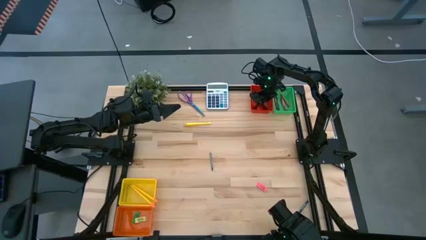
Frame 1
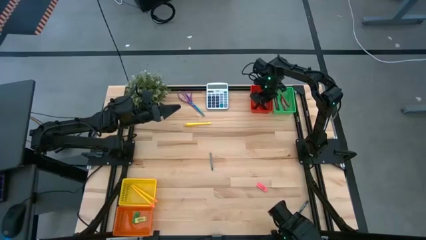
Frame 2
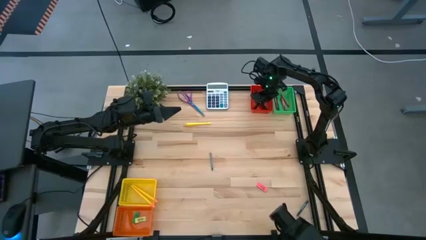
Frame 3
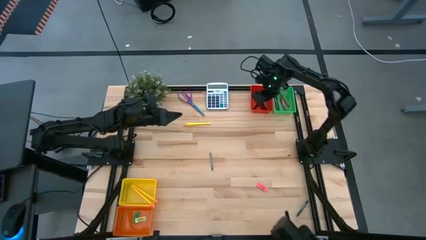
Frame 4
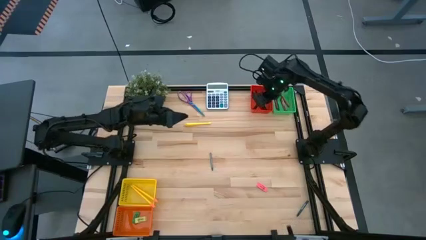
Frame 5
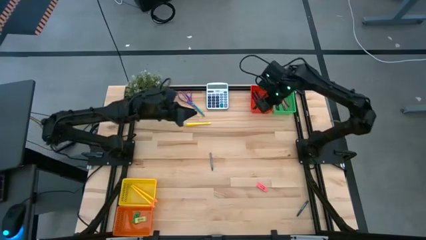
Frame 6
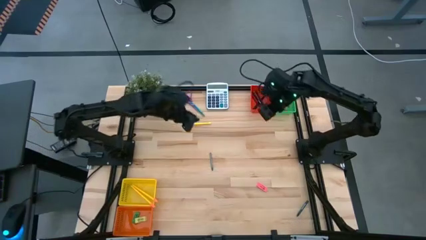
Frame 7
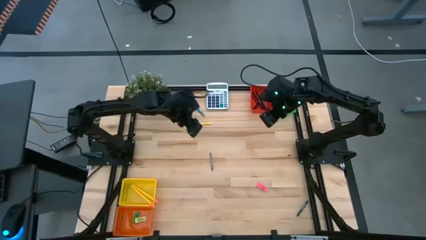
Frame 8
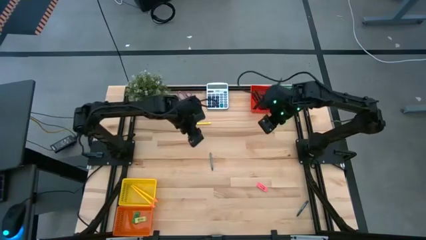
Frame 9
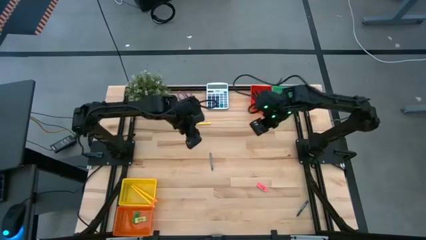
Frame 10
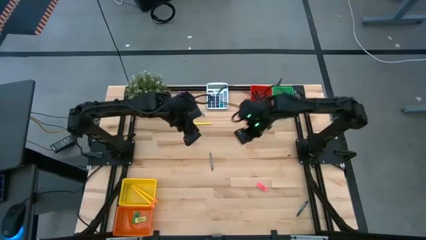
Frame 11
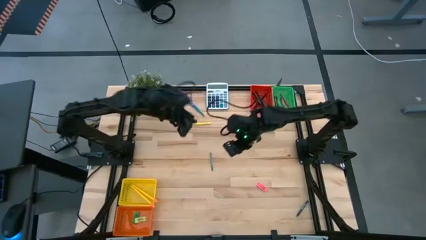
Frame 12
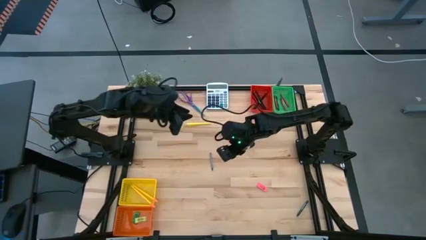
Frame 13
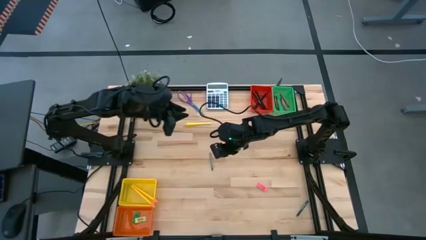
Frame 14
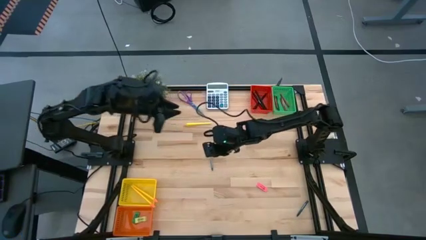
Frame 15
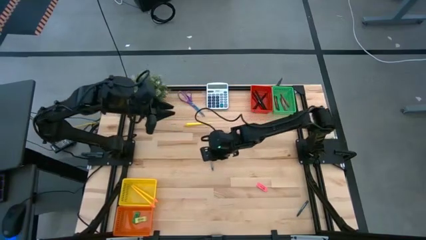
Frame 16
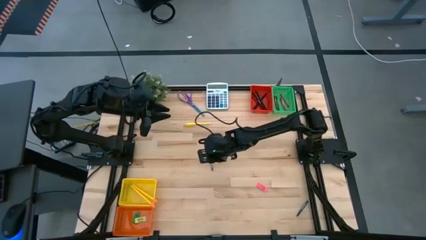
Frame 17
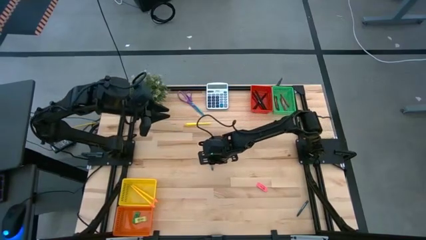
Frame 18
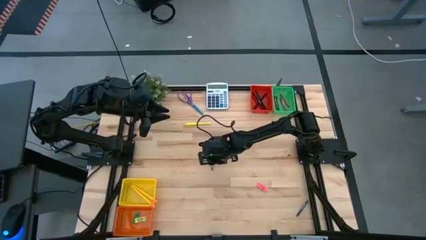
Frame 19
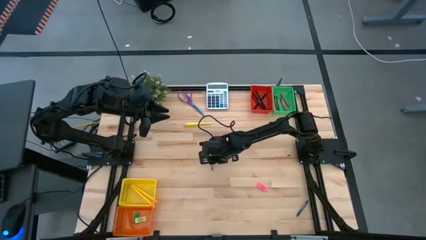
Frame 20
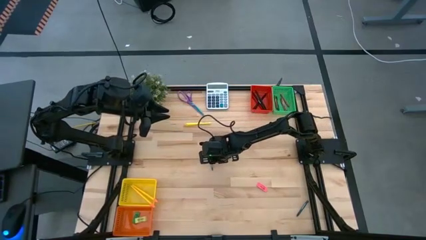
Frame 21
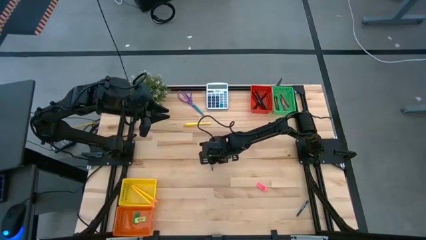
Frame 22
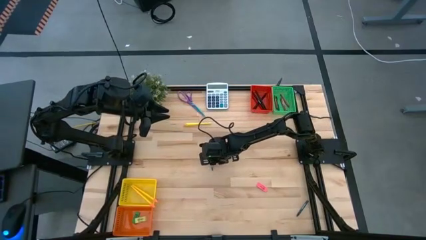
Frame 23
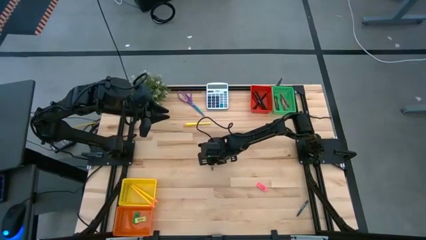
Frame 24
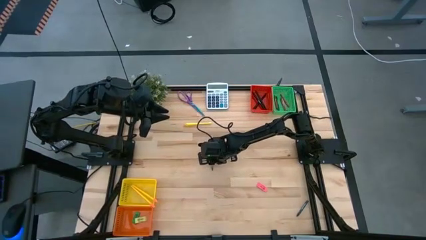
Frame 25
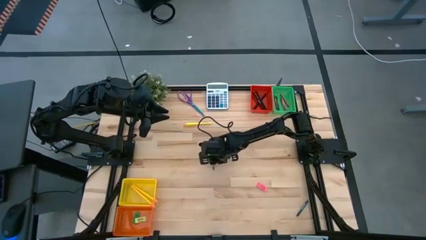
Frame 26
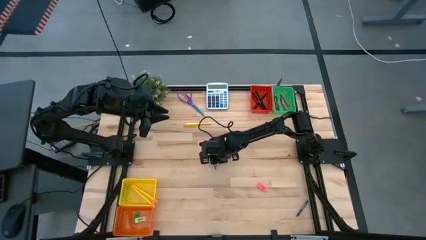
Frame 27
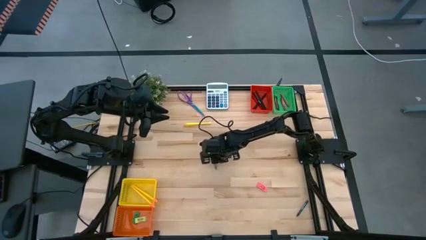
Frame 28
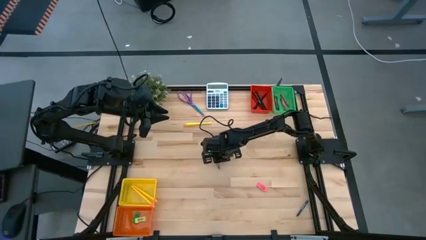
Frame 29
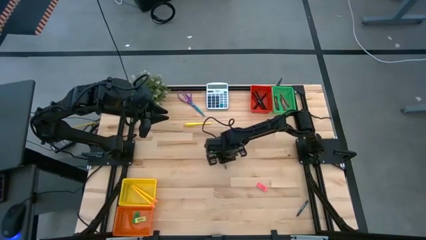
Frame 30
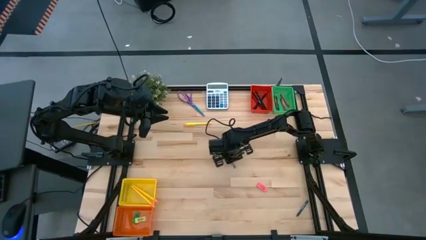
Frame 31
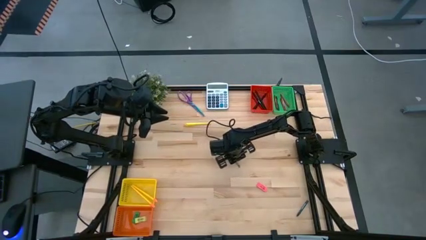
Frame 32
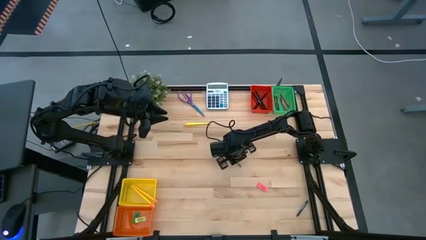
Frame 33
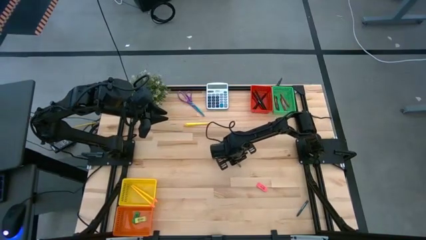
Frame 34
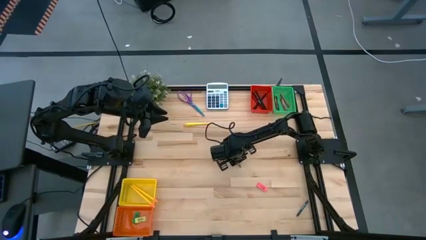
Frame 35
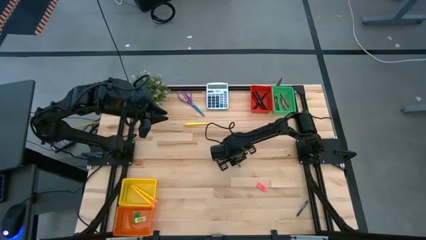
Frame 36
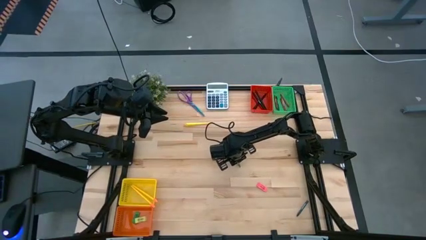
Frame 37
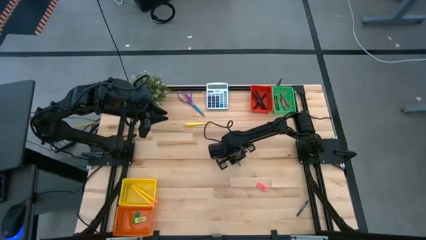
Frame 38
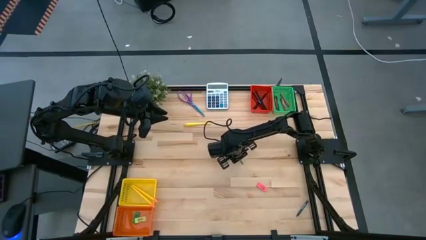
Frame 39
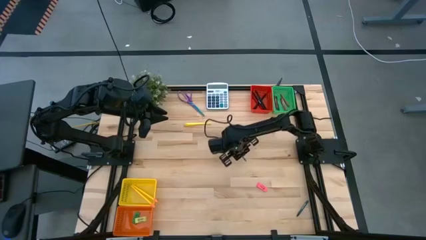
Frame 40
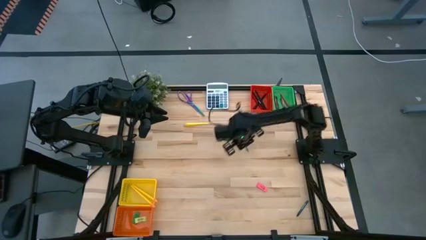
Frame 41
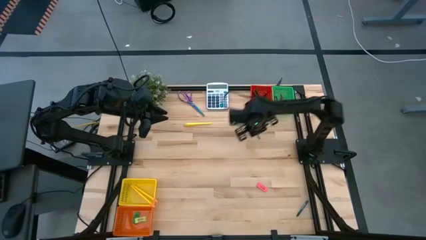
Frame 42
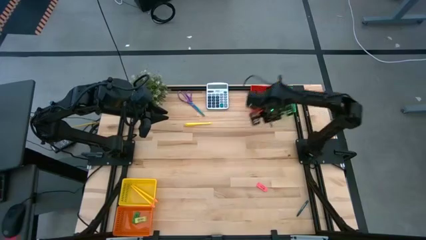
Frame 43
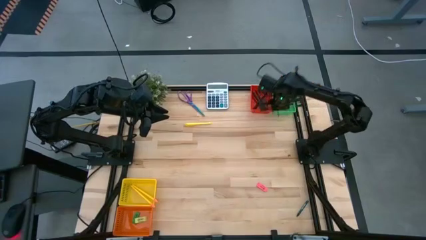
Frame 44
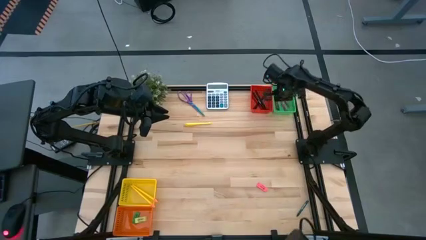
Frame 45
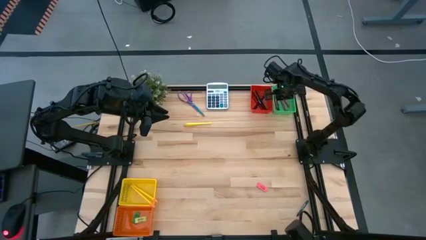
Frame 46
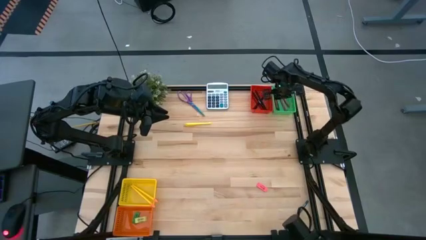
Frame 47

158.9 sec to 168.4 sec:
Task: Sort crayons/erasers/pens/pencils in bins
Put the gray crayon into the green bin

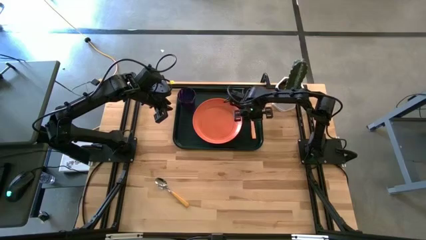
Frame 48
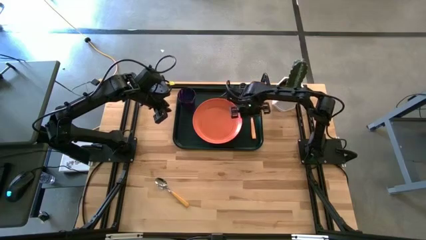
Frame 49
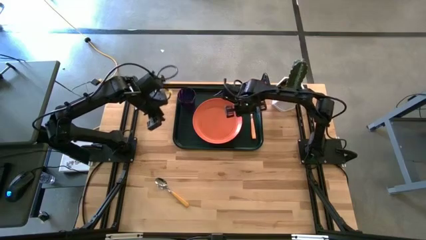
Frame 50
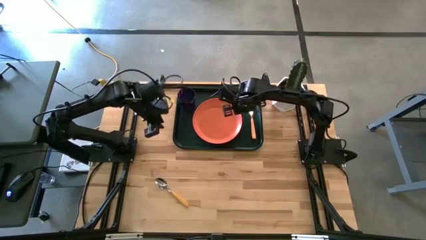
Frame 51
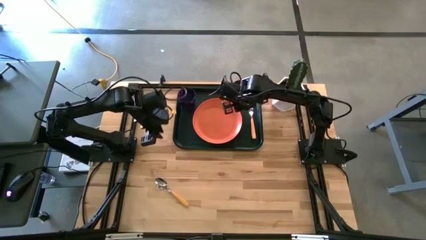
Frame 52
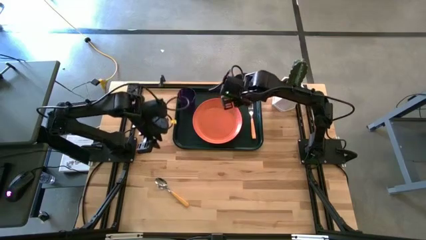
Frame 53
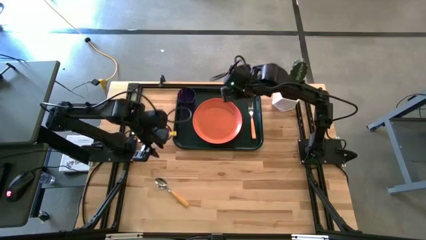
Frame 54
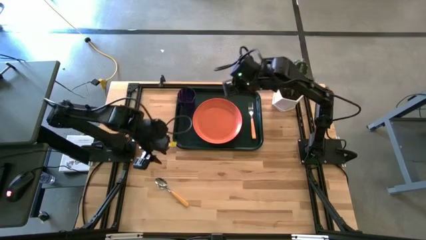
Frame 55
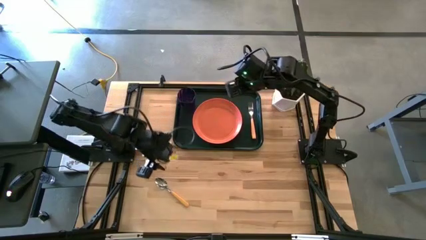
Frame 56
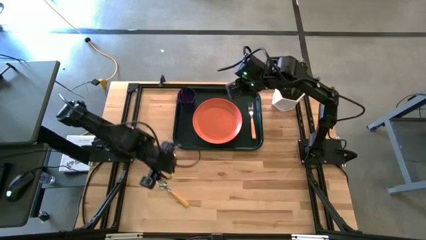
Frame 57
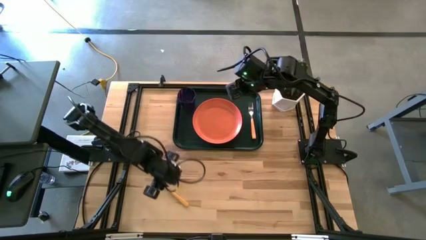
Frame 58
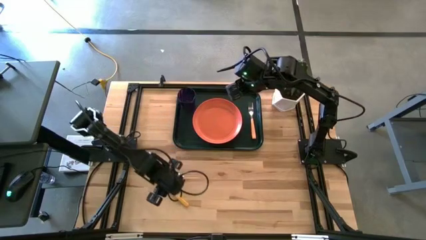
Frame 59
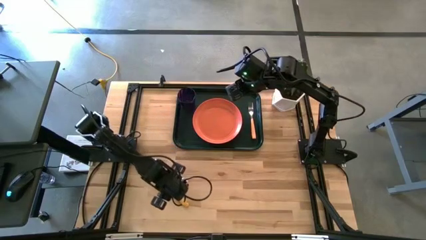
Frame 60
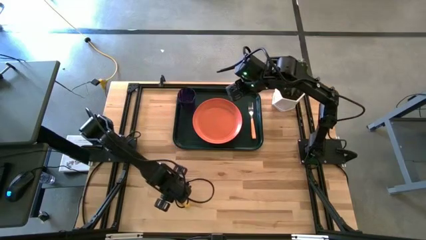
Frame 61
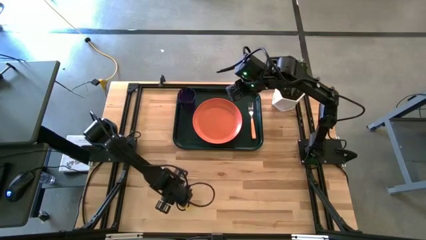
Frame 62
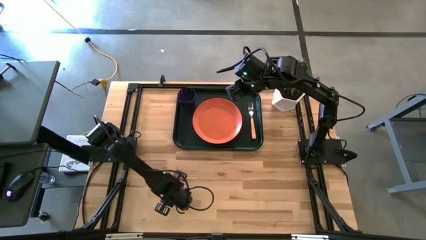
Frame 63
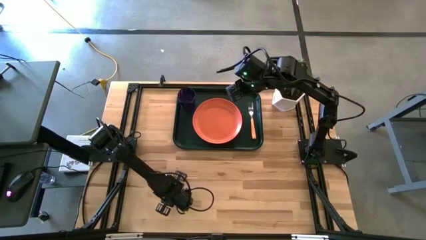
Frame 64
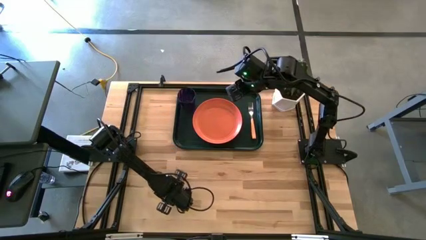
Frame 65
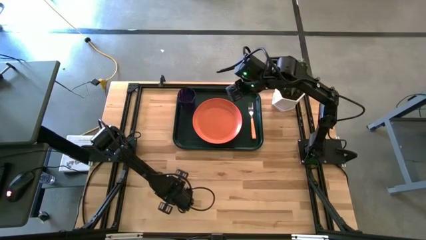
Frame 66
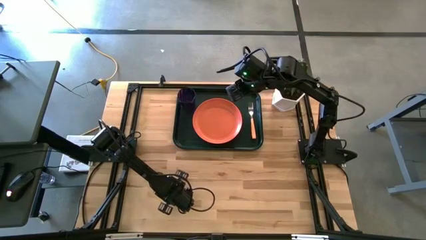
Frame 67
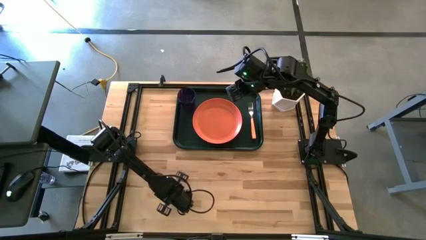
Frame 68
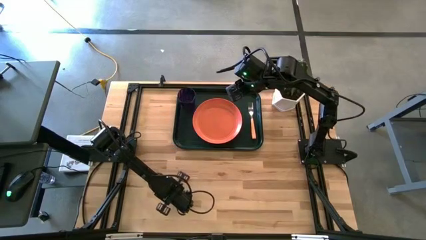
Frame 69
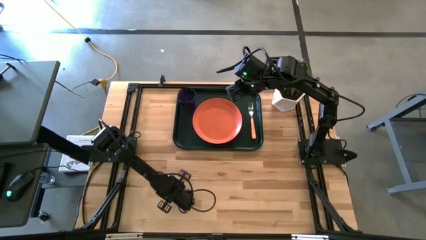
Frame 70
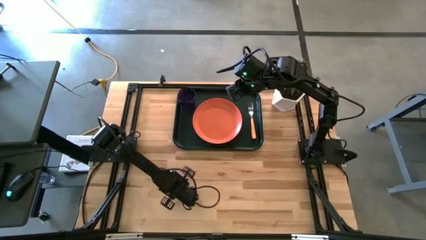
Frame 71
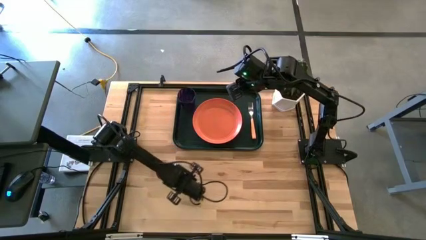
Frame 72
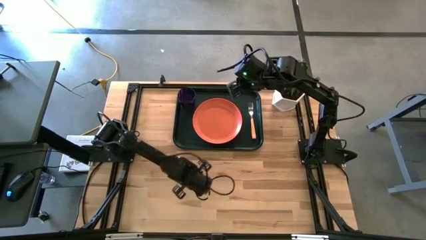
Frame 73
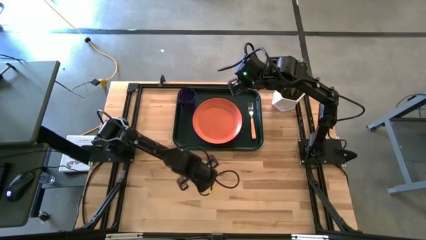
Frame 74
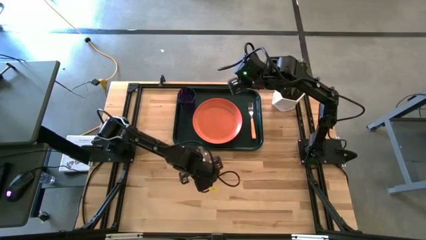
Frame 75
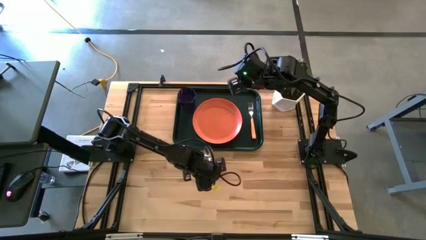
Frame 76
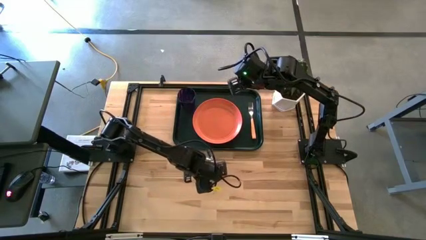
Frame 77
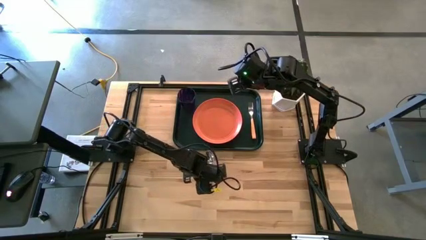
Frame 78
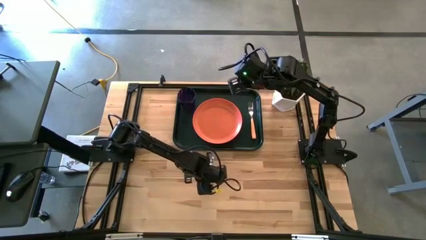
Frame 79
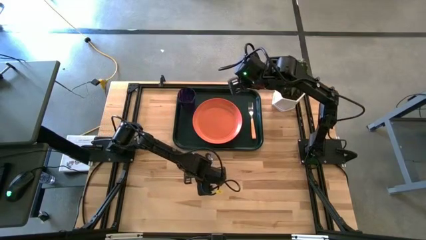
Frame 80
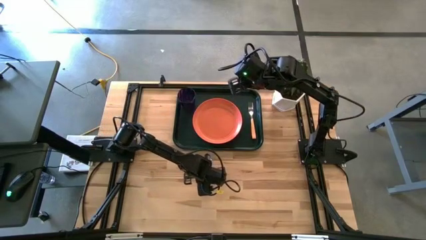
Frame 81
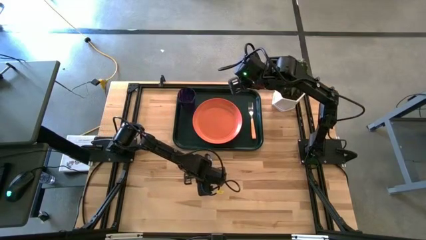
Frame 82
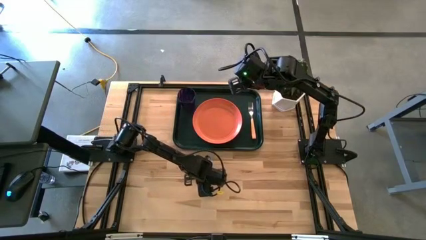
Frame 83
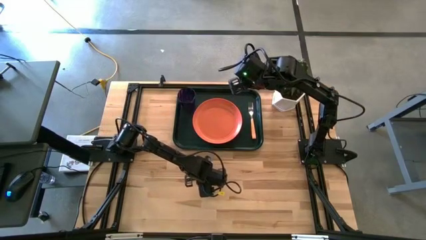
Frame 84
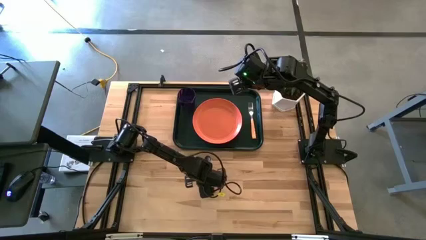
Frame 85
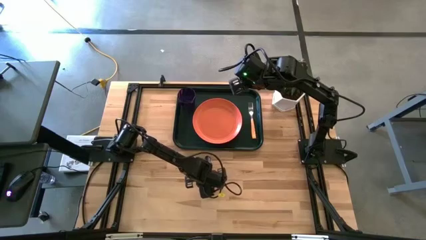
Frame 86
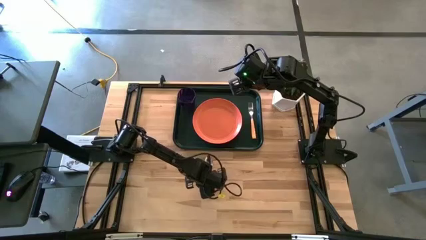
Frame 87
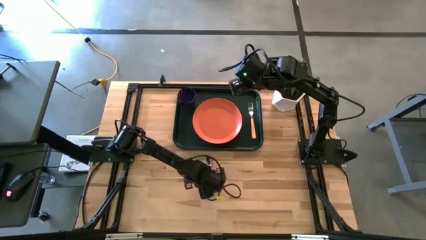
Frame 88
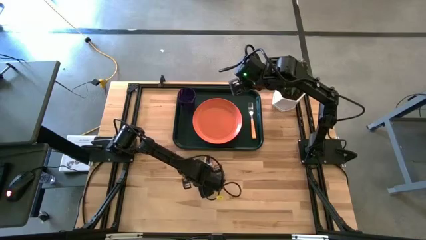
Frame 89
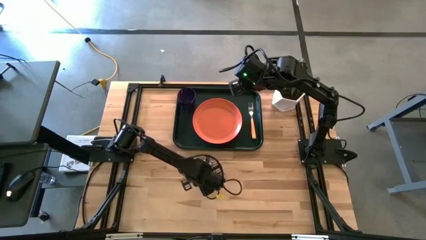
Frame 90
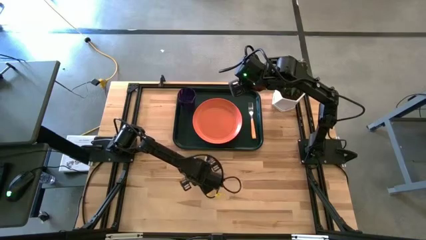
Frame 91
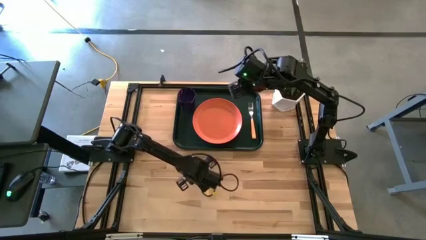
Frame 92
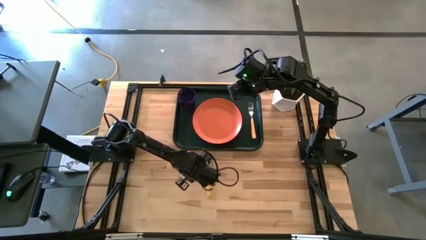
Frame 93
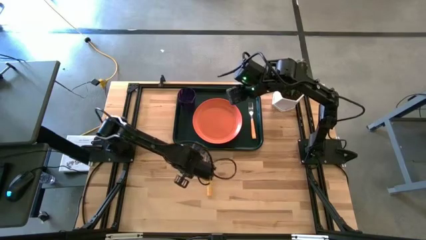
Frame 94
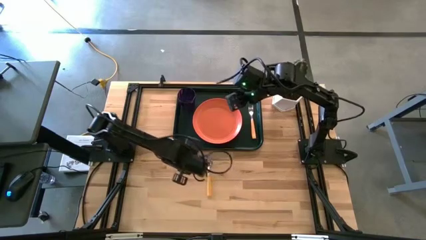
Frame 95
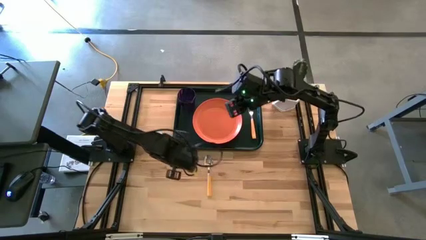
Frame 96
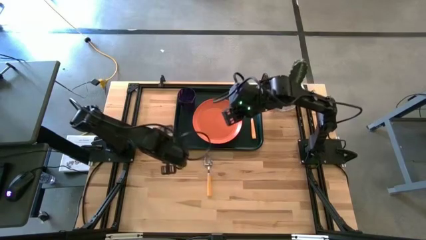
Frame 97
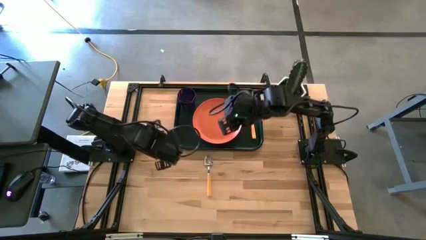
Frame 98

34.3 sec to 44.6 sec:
Task: Pick and place plate/cup/fork/spoon on tray
Put the yellow spoon on the black serving tray to the left of the yellow fork
